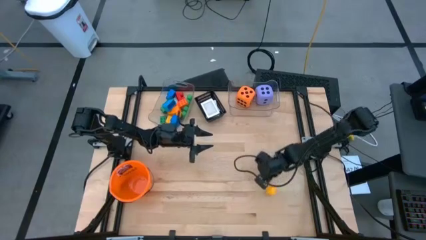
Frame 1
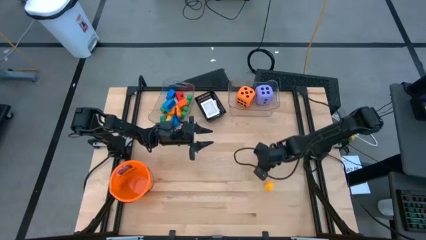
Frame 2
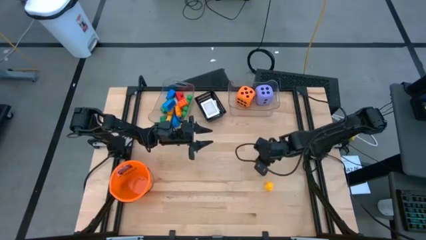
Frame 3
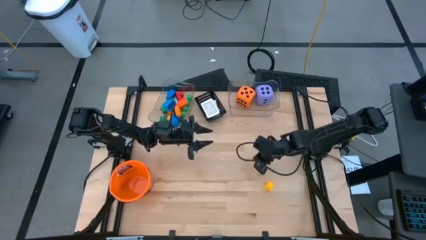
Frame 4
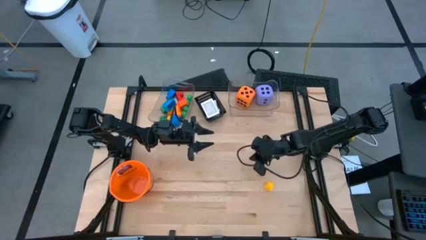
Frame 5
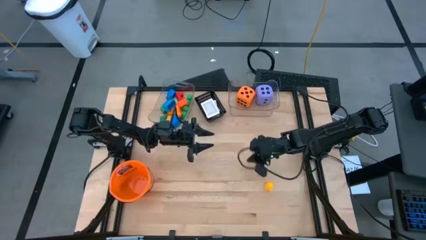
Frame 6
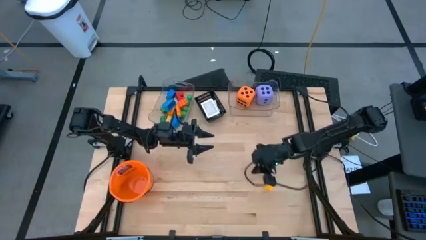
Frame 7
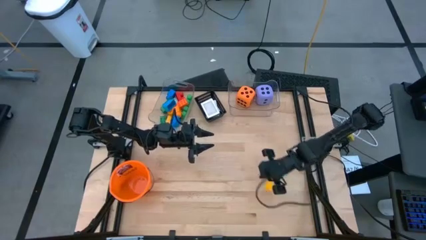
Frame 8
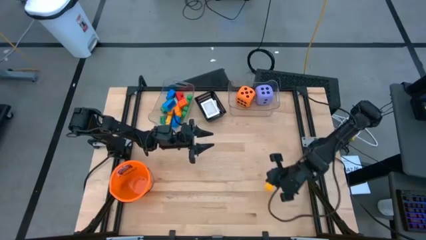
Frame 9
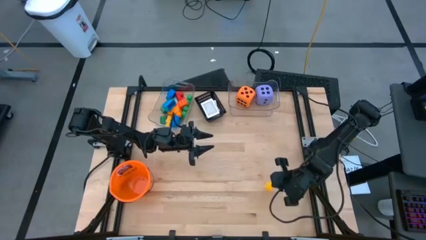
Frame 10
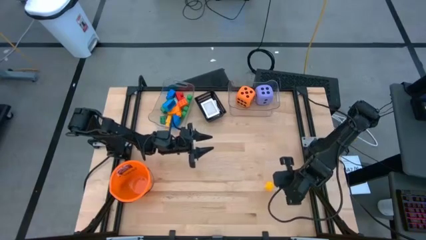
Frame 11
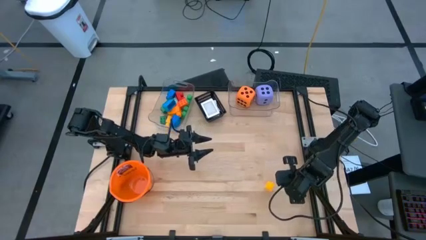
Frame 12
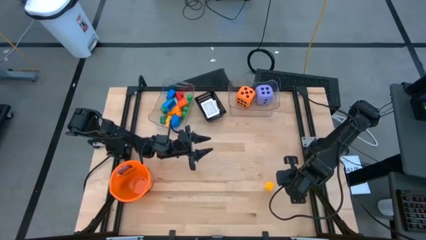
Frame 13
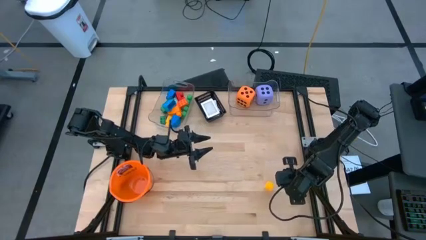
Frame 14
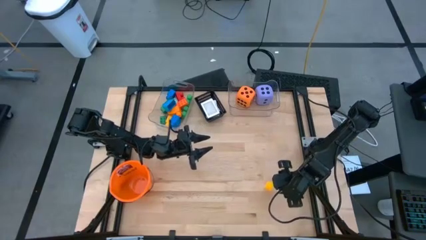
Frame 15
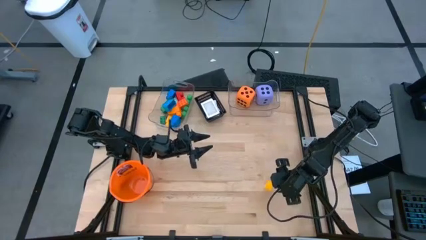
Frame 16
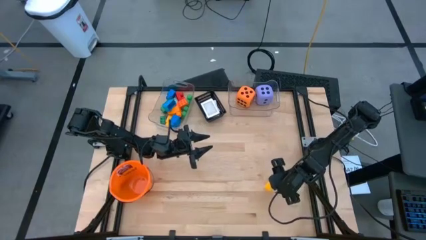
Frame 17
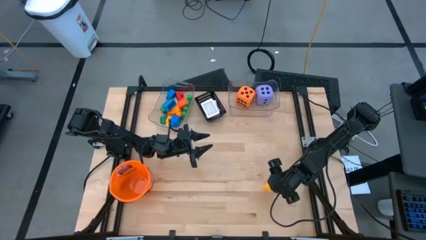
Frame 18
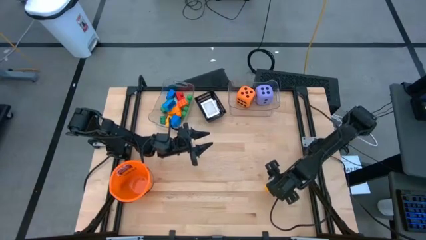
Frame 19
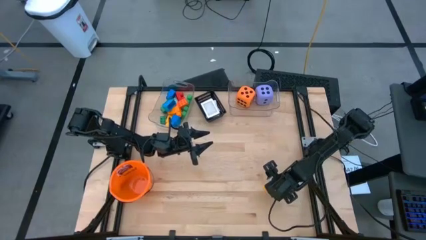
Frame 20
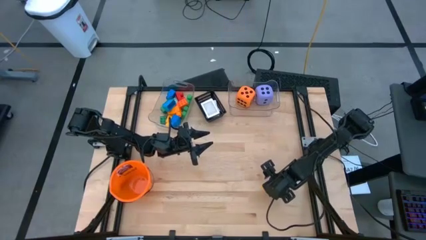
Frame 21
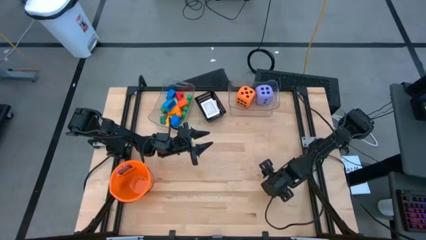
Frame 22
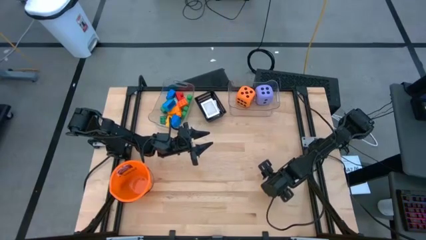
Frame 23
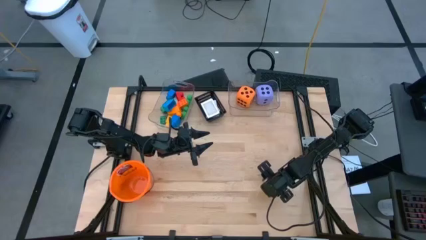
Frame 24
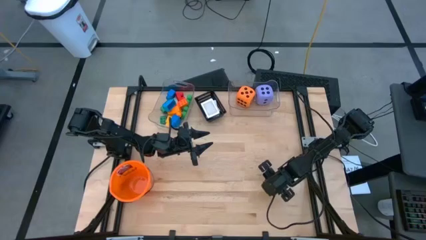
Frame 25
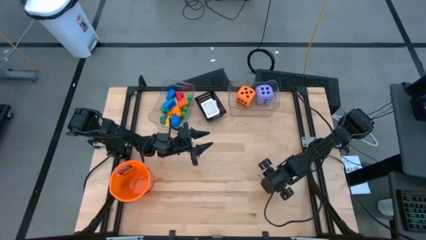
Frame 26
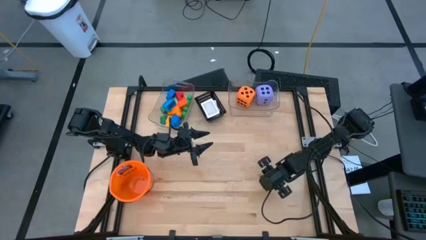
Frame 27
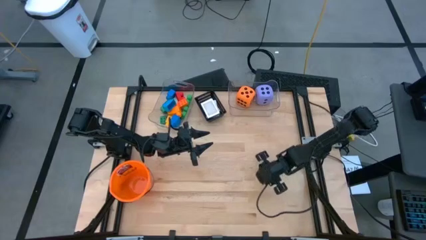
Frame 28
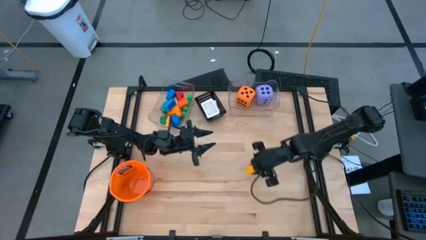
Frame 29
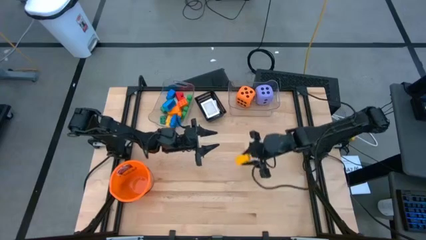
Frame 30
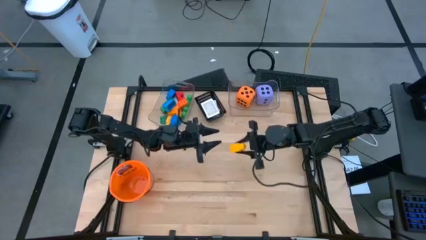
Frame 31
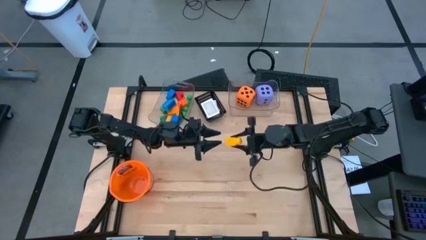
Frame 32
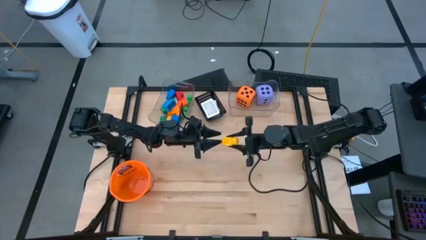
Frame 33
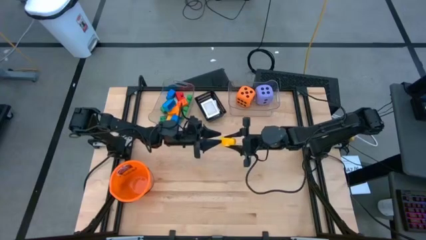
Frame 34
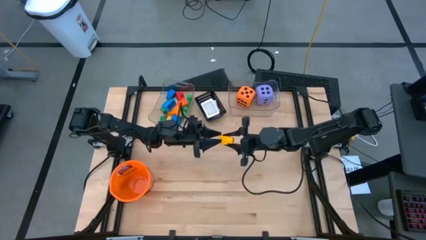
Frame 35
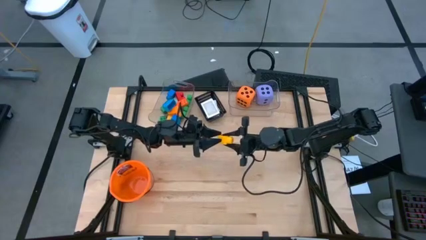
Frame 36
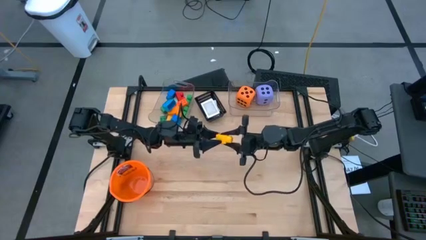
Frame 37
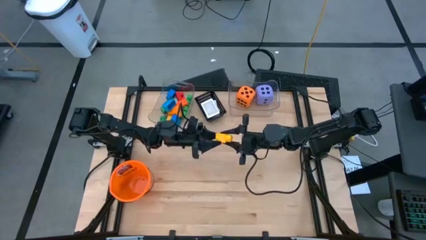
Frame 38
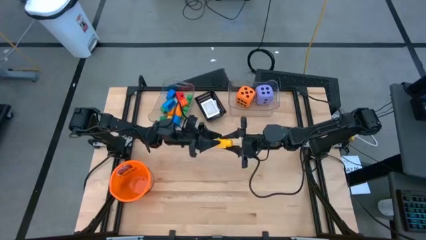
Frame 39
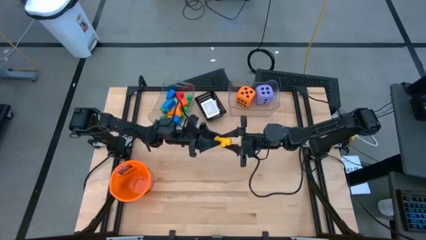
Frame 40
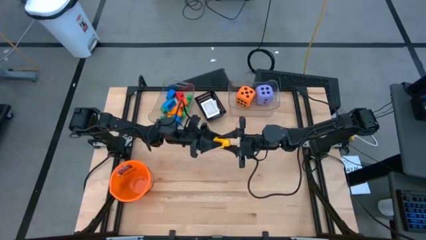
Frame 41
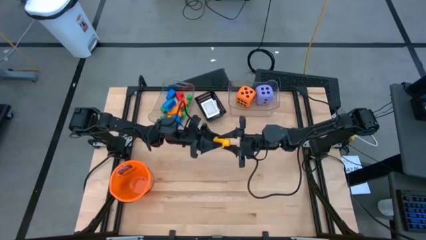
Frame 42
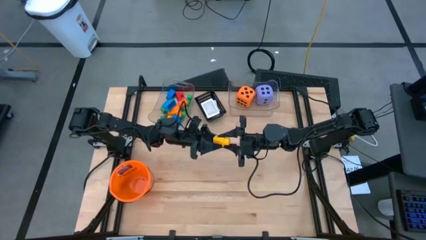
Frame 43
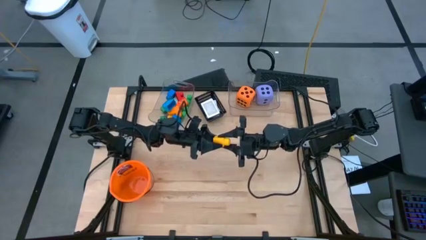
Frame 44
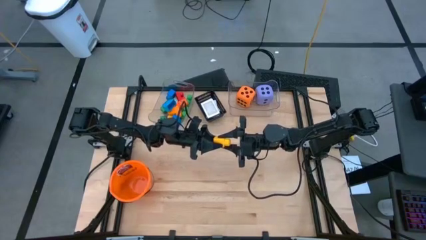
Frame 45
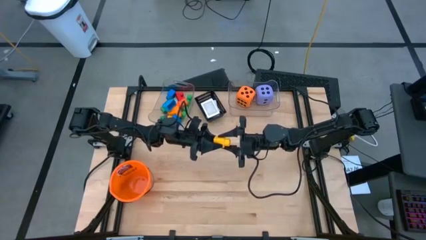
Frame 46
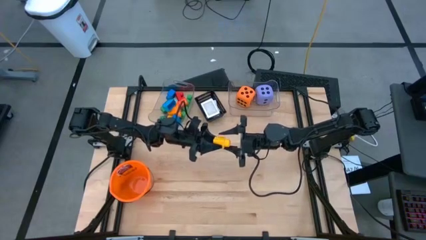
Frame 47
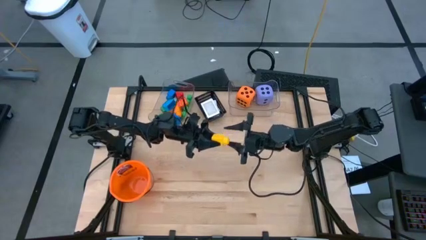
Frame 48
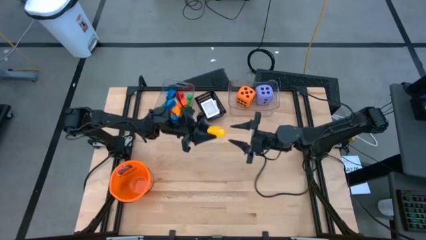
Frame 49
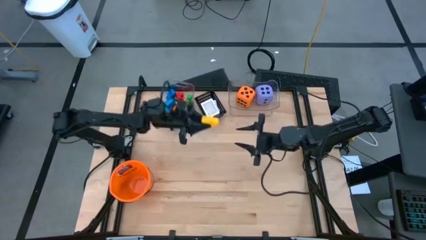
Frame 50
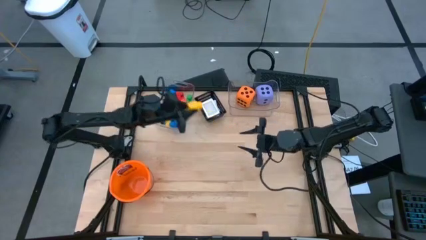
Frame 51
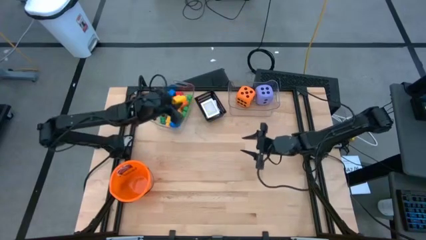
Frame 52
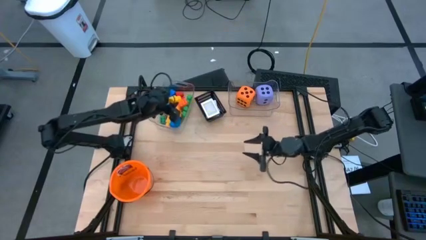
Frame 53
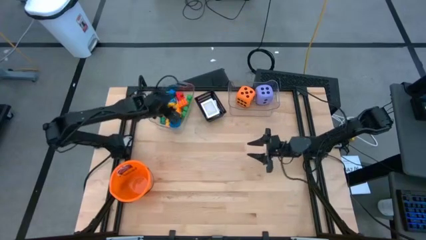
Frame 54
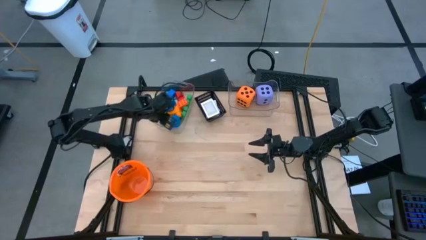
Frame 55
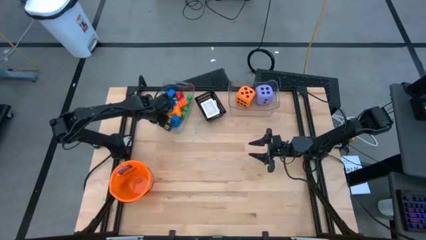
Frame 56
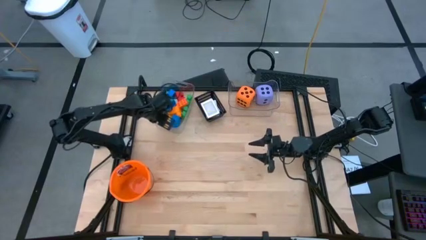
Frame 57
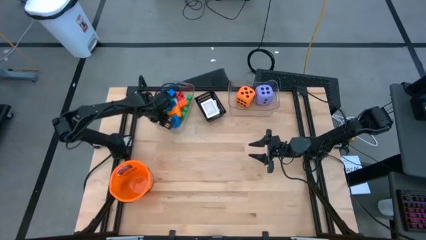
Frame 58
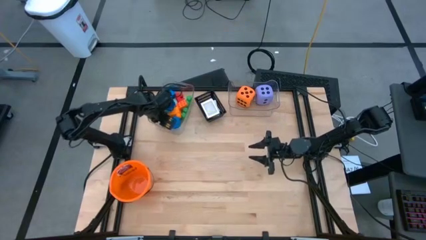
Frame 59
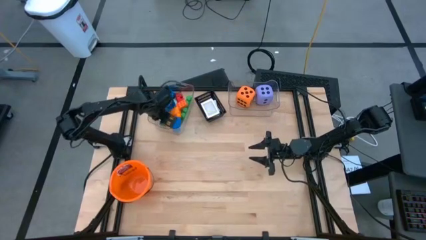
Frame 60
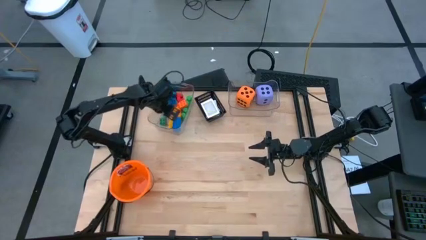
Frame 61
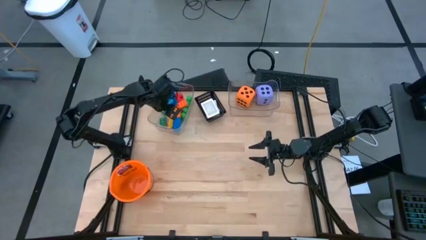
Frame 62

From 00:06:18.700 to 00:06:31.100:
Task: Pick & Place Toys
Put the yellow gamepiece into the left transparent bin
